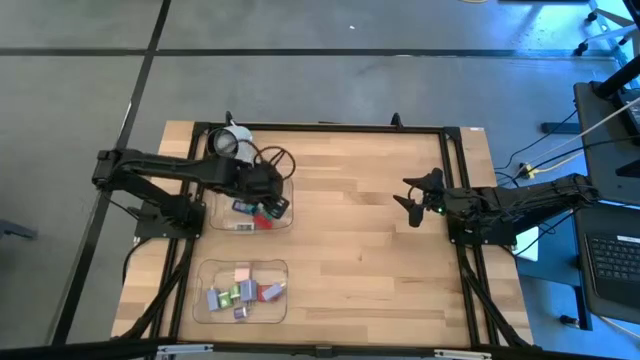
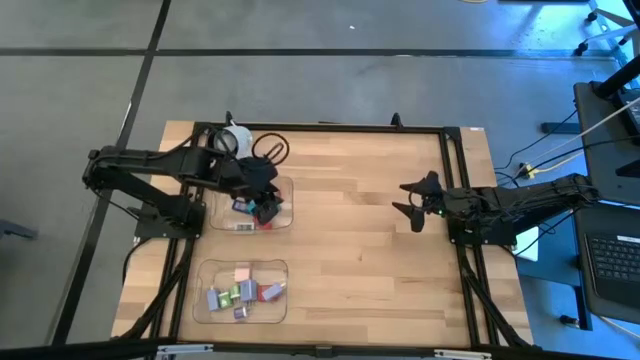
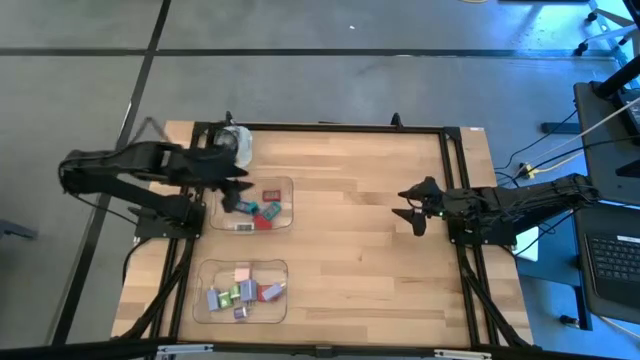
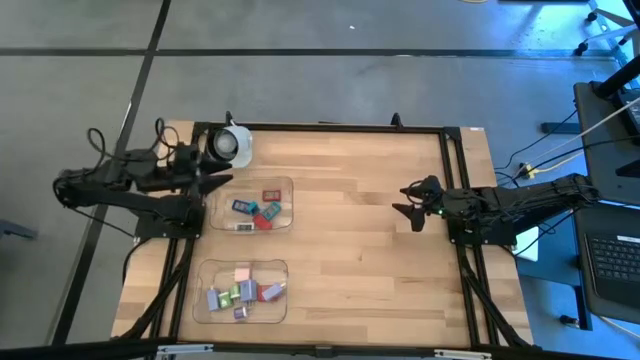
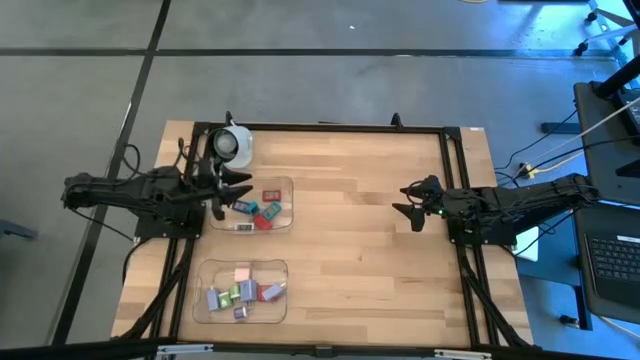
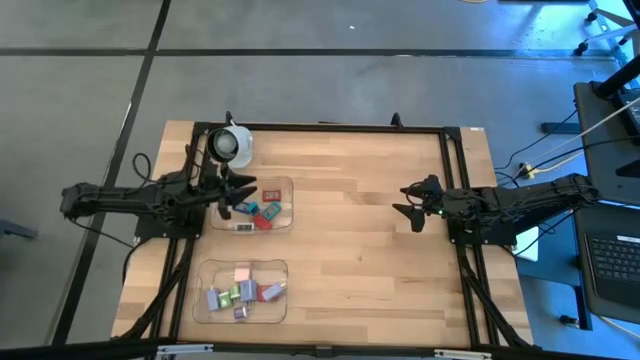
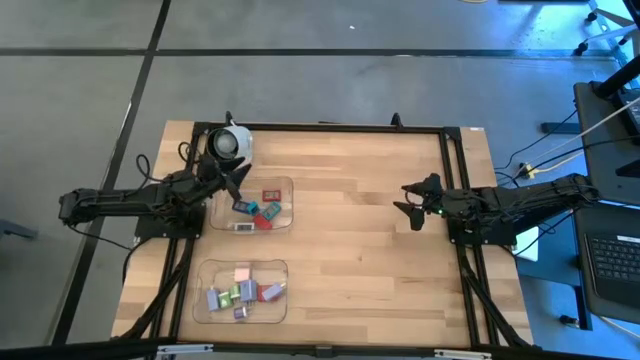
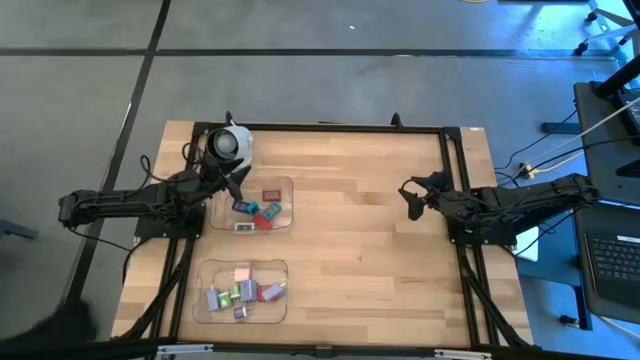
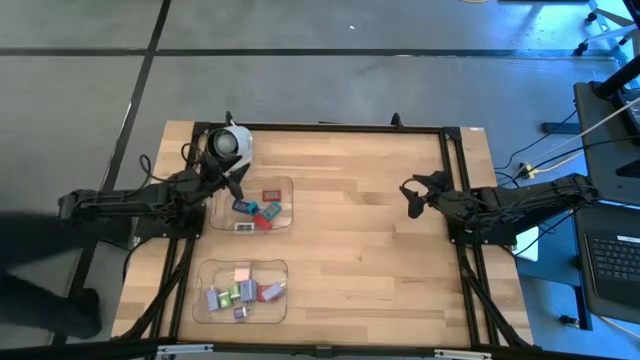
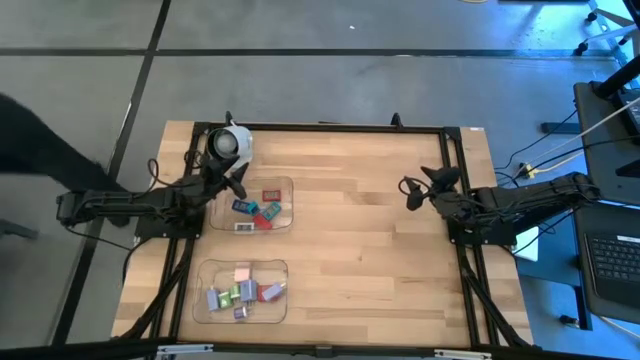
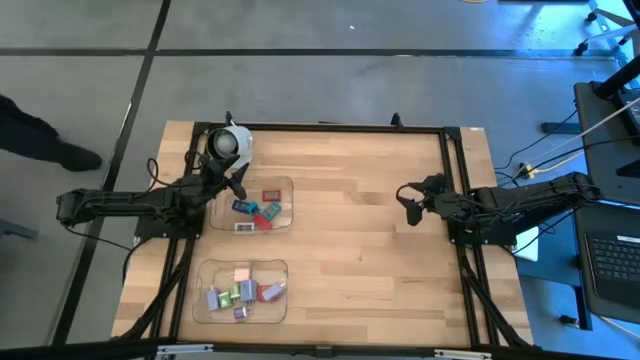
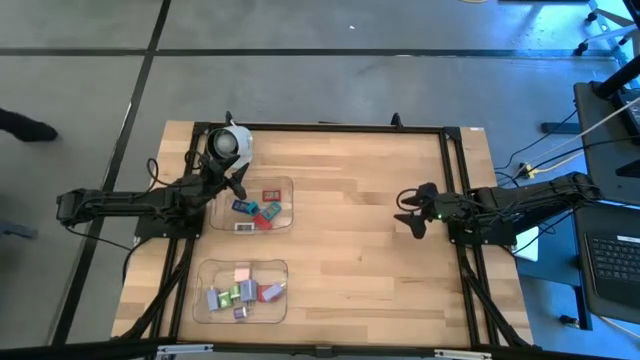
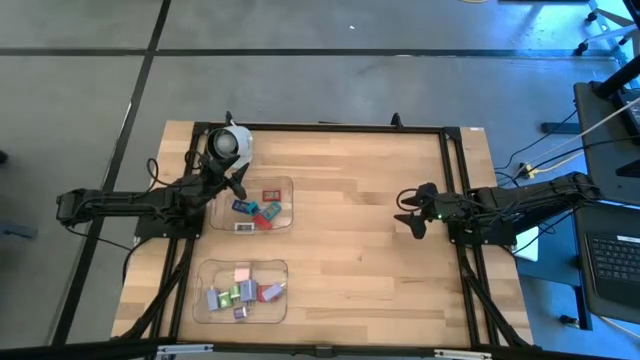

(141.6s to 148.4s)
Task: Pick & Place Office items
Return to Home Position

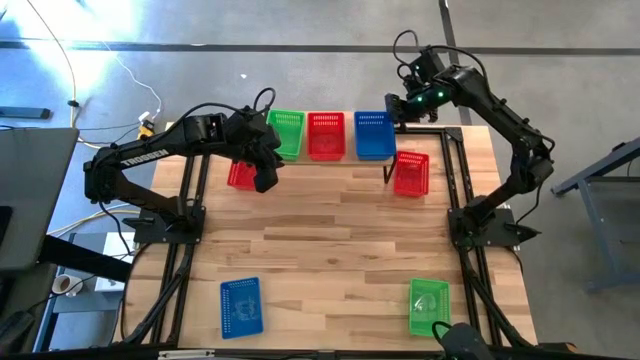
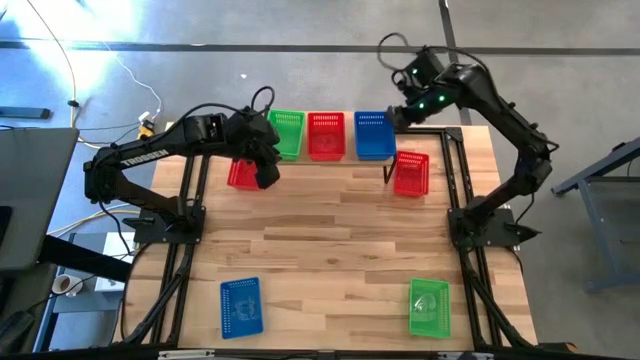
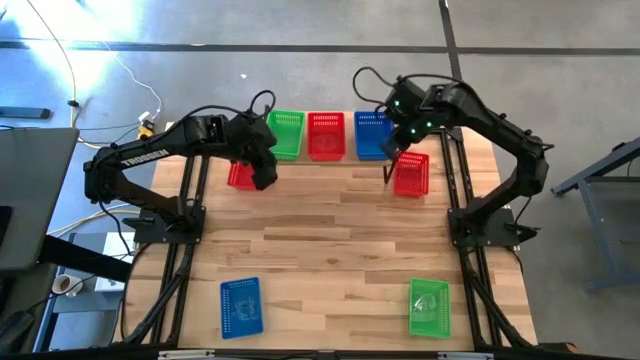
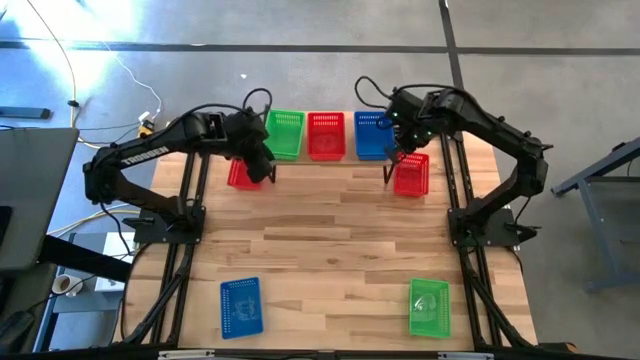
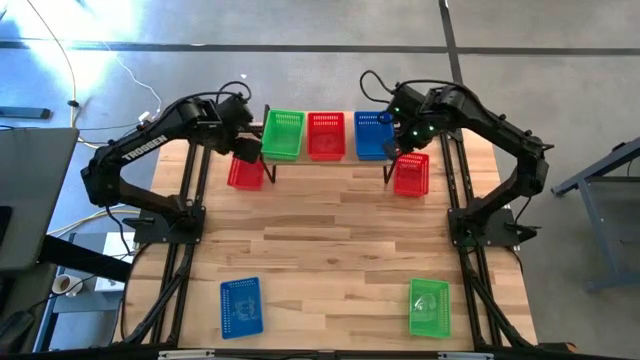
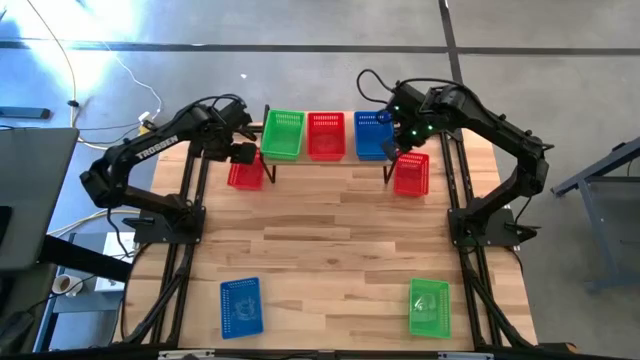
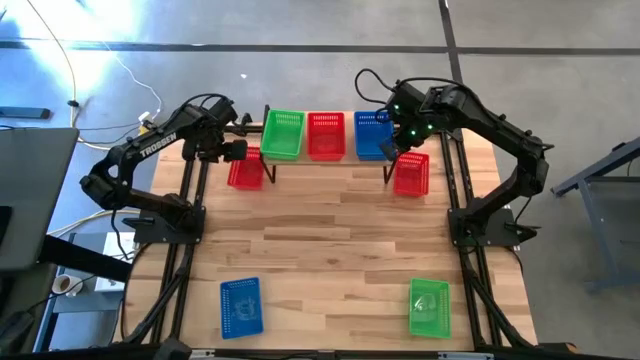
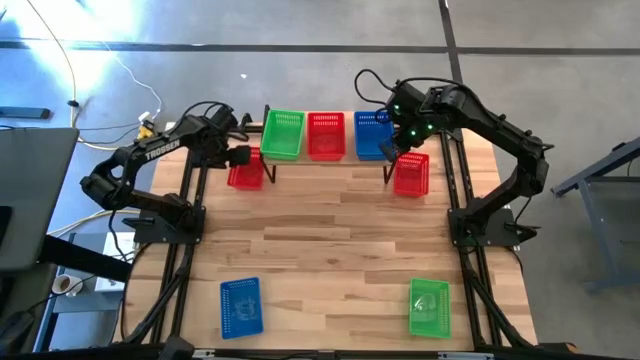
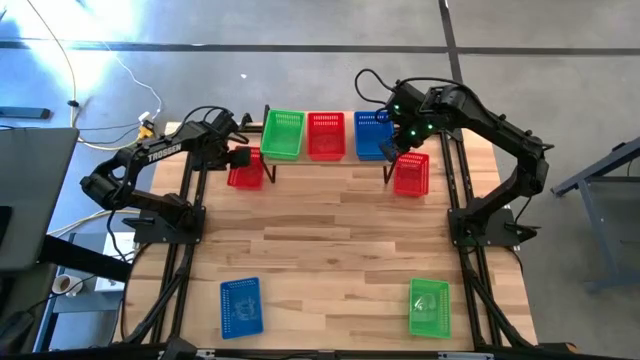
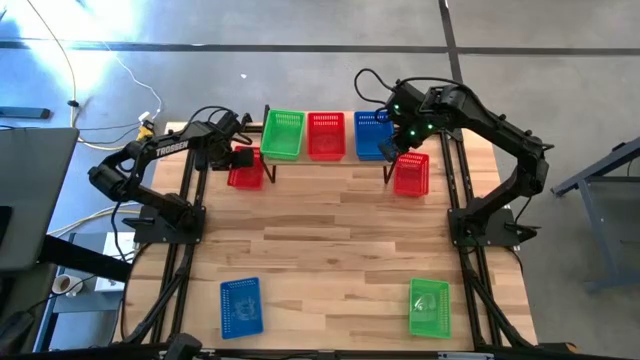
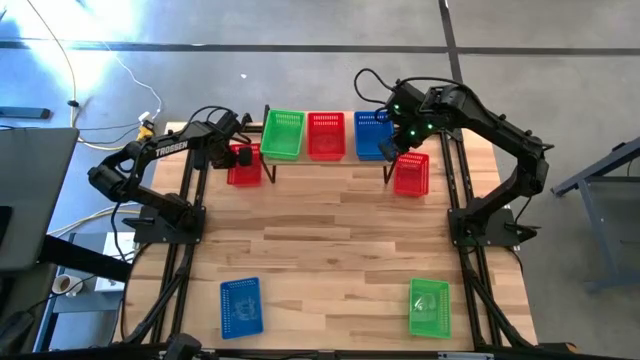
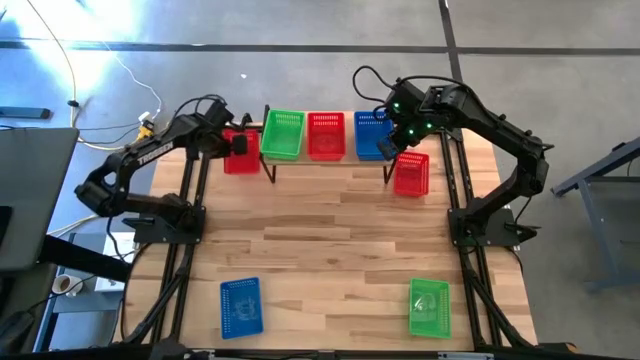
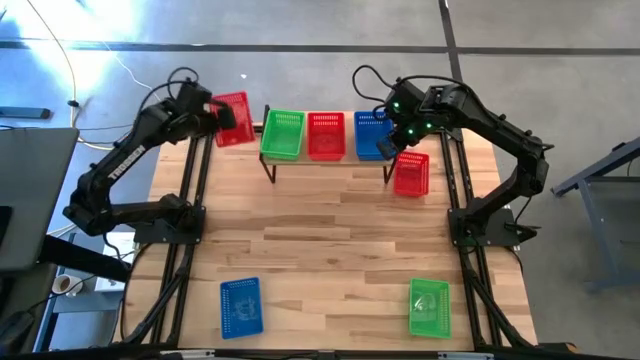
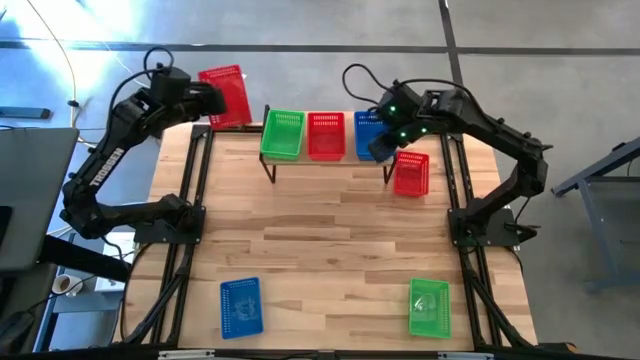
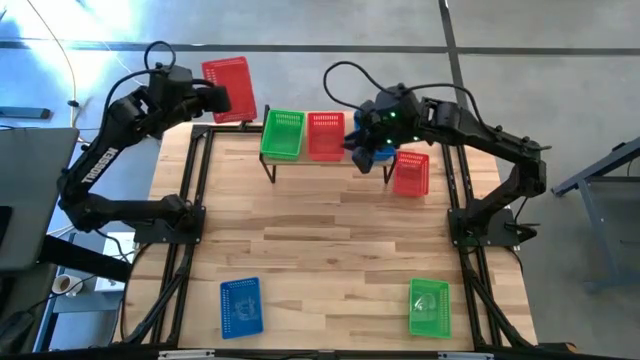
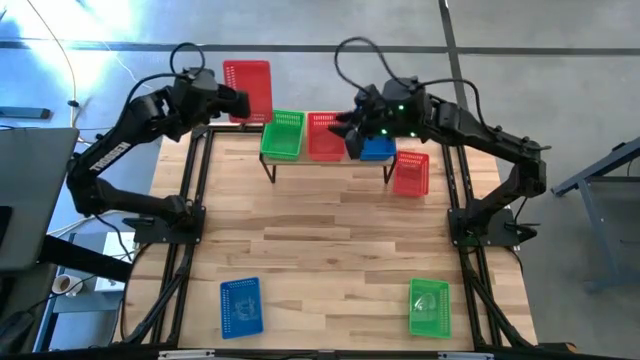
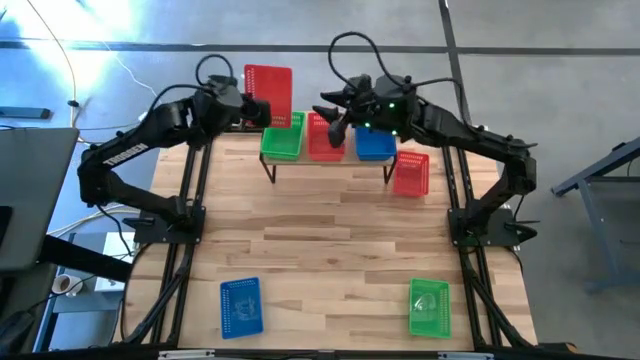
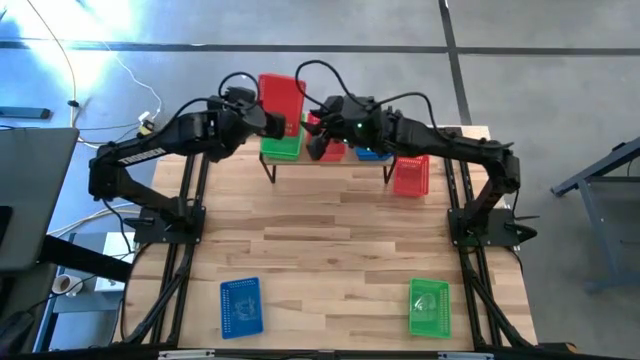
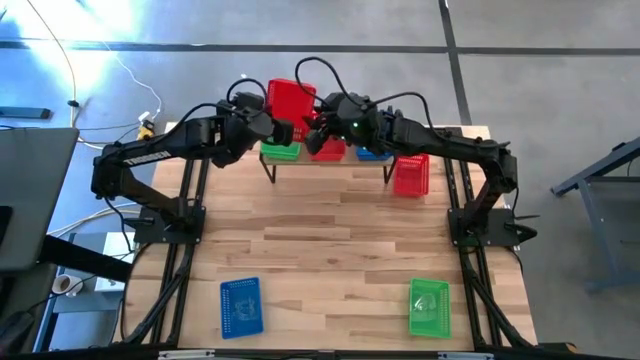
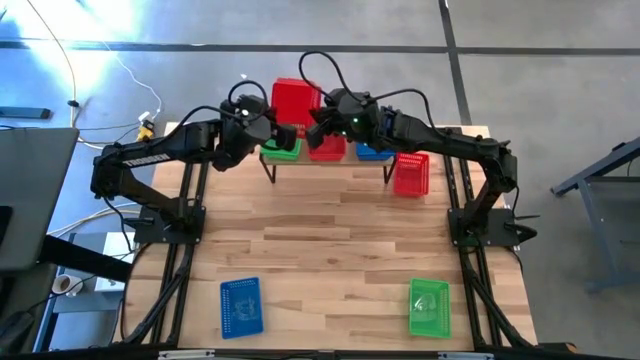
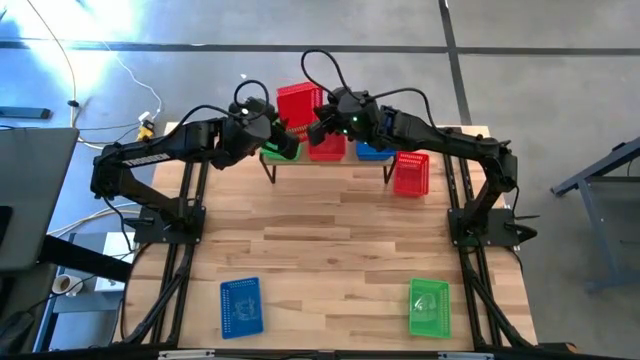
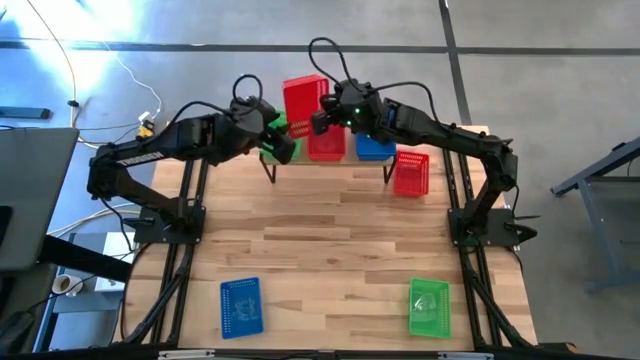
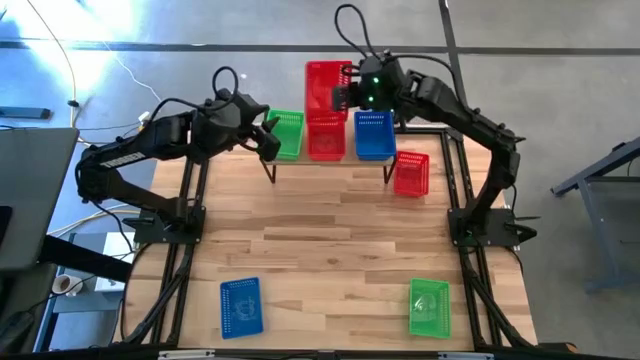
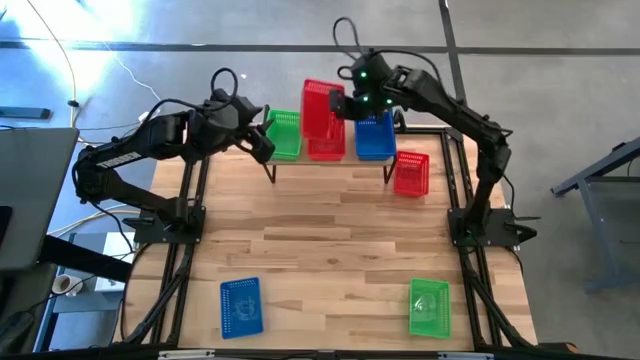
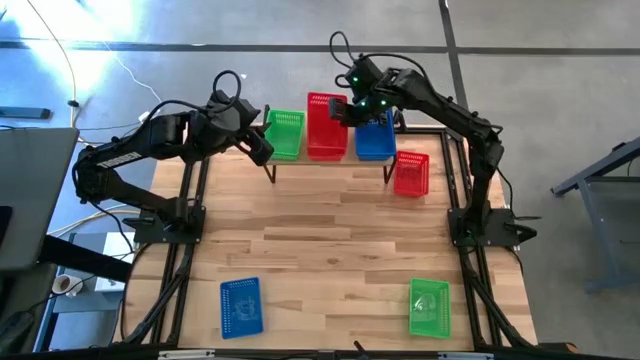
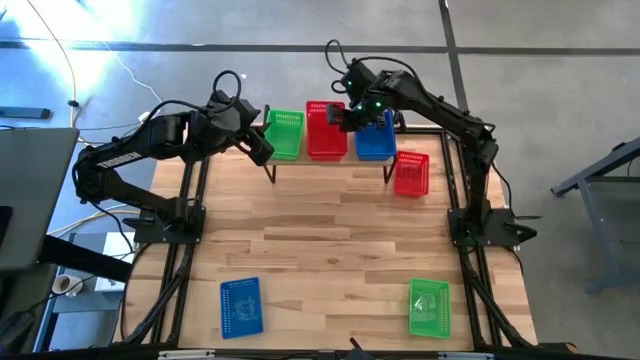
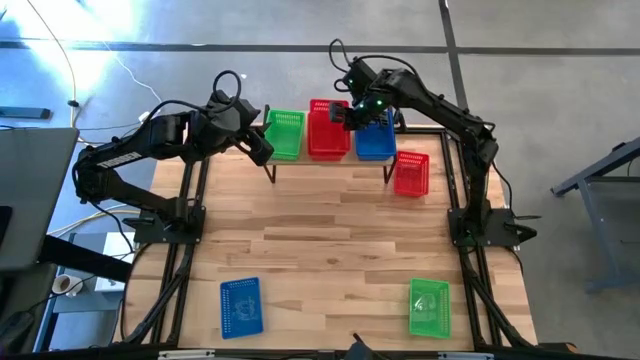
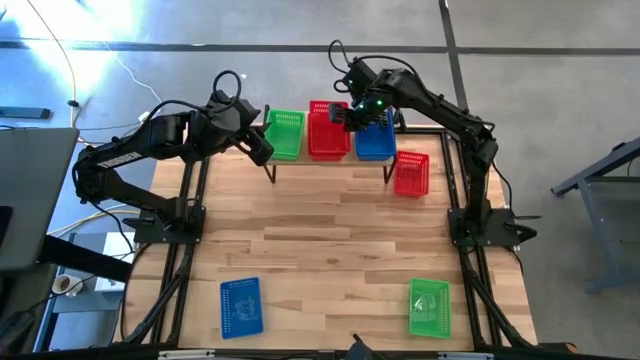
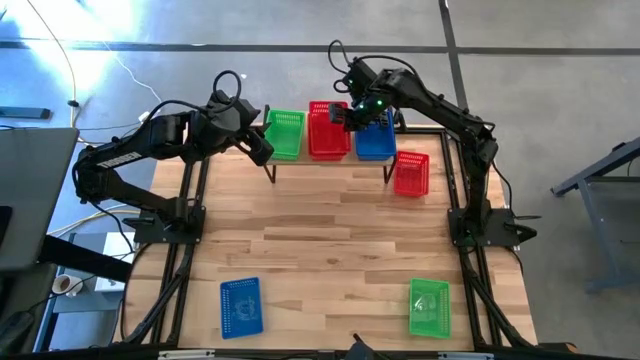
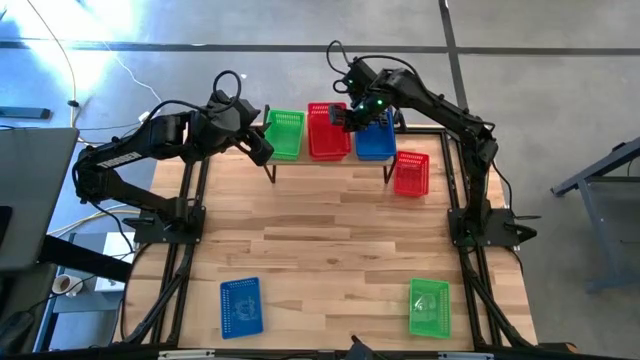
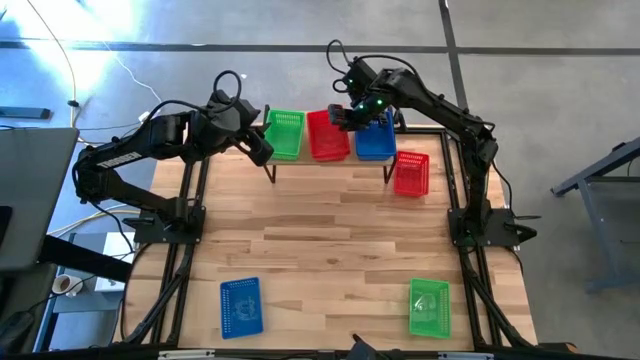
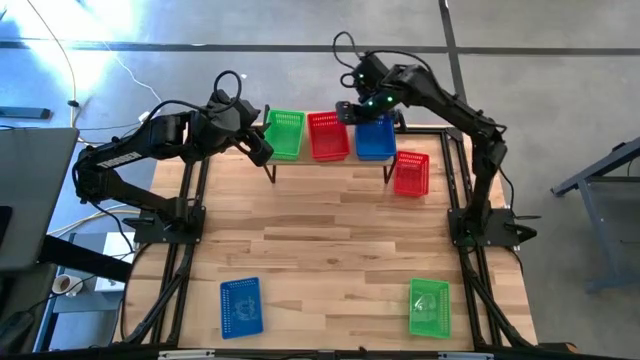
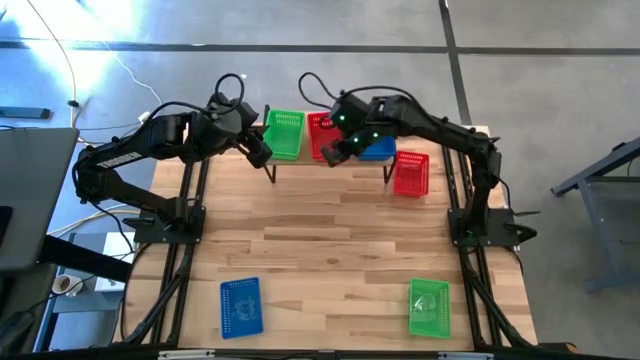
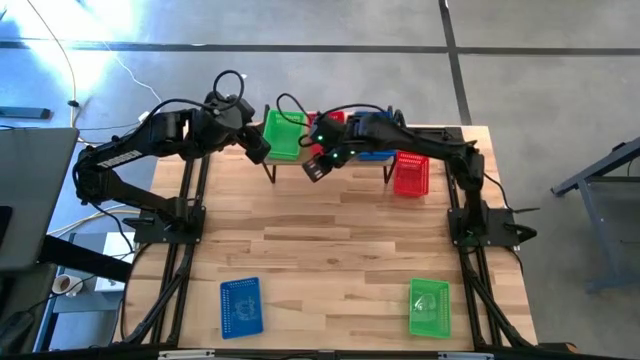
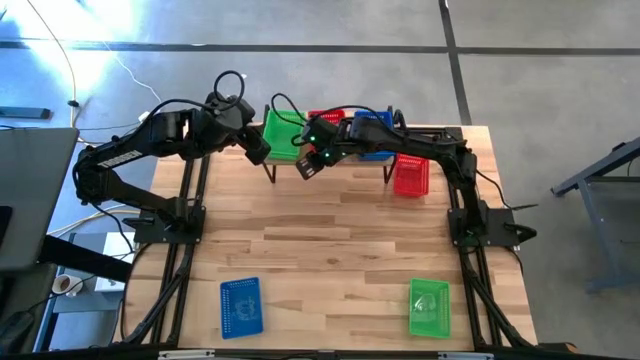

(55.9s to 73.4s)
Task: Stack baskets on shelf by color
Stack the left red bin on top of the red bin on the shelf
